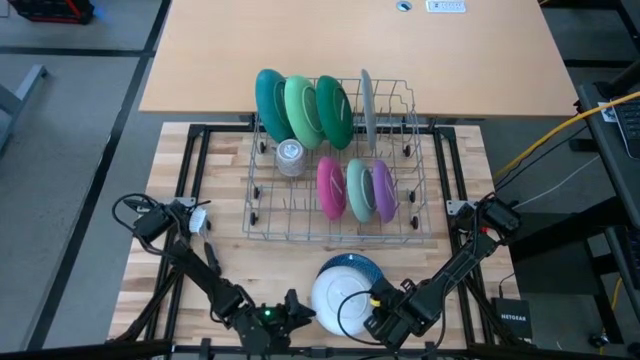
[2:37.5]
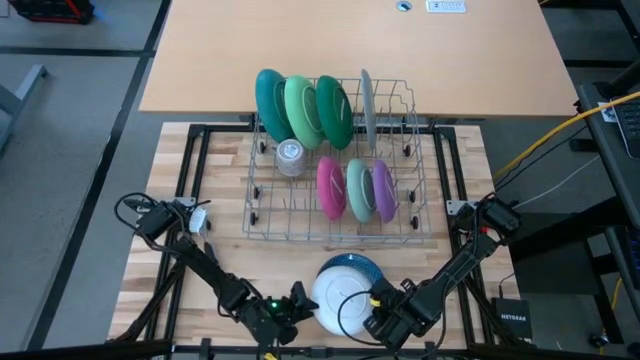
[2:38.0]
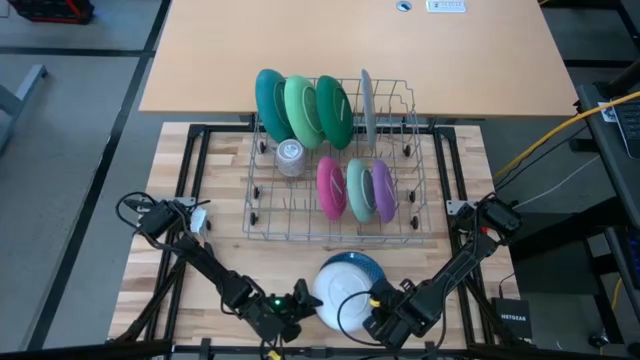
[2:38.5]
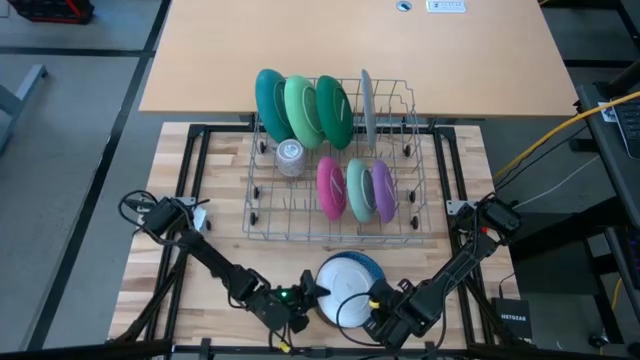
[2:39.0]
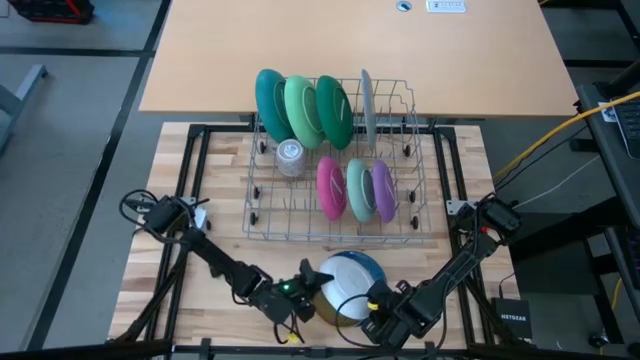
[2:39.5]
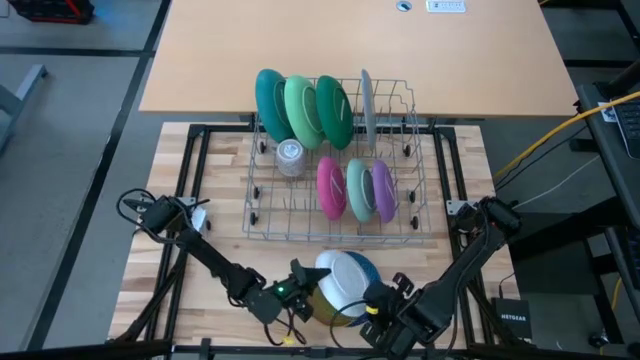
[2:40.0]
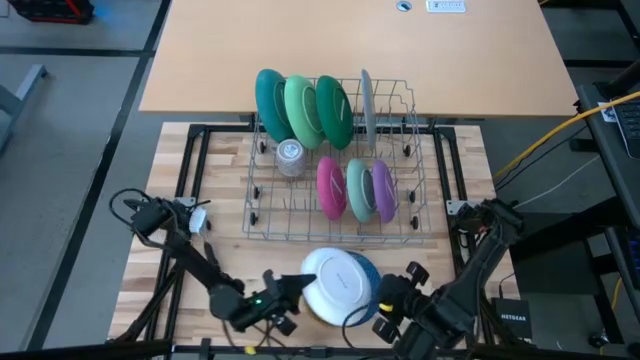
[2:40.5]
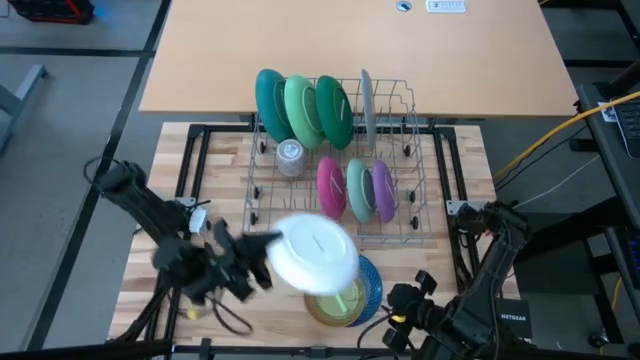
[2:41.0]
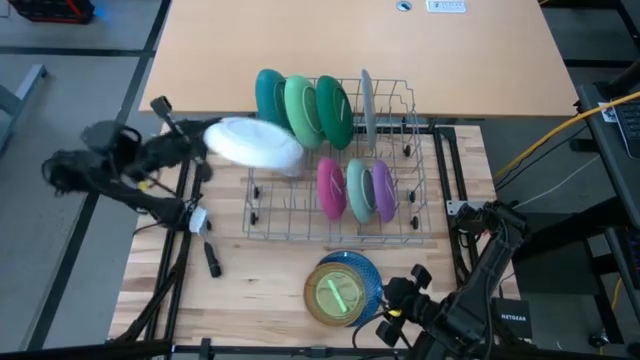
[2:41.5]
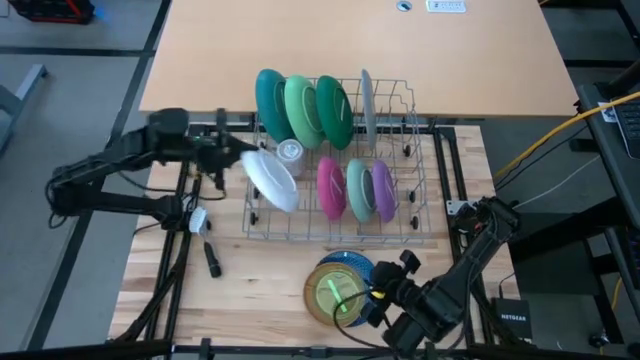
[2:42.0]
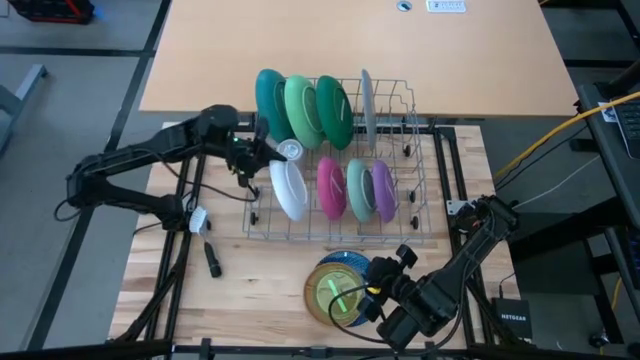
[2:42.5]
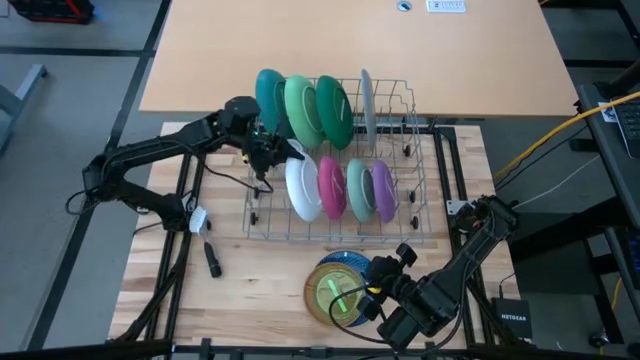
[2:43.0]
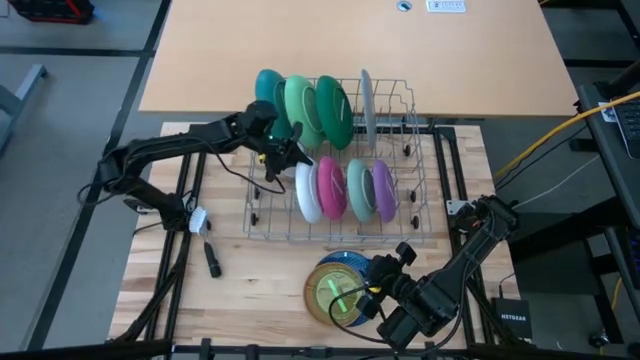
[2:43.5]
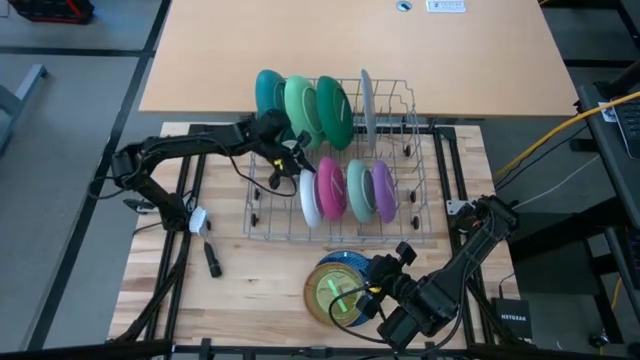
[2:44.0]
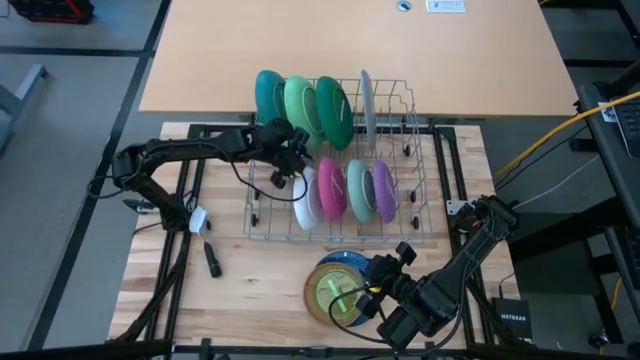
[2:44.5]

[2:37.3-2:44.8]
Task: Sort dishes
Put the white plate in the dish rack

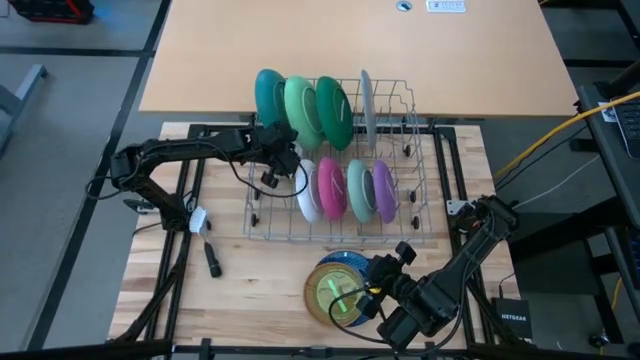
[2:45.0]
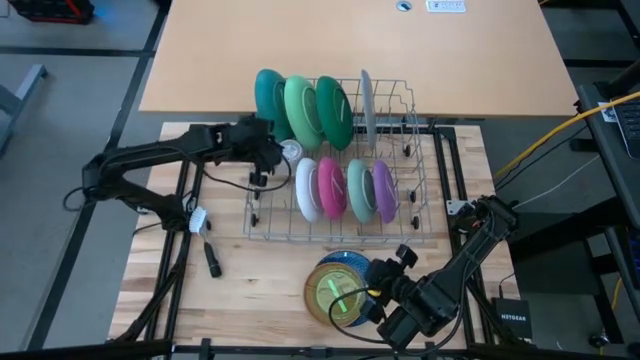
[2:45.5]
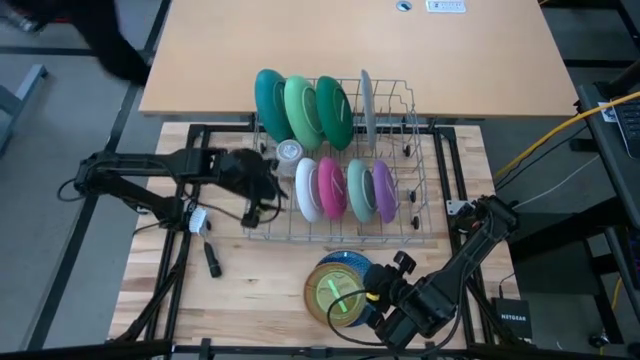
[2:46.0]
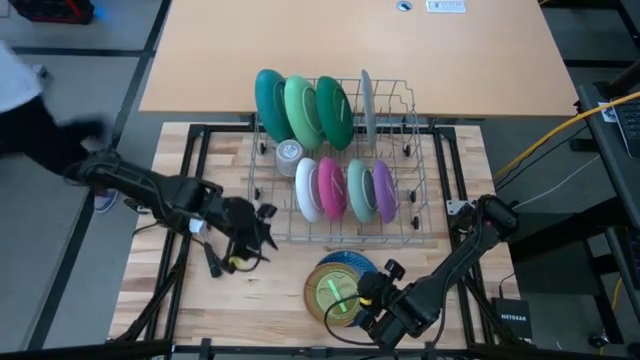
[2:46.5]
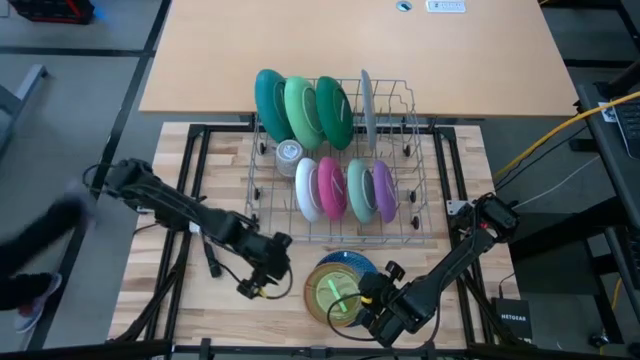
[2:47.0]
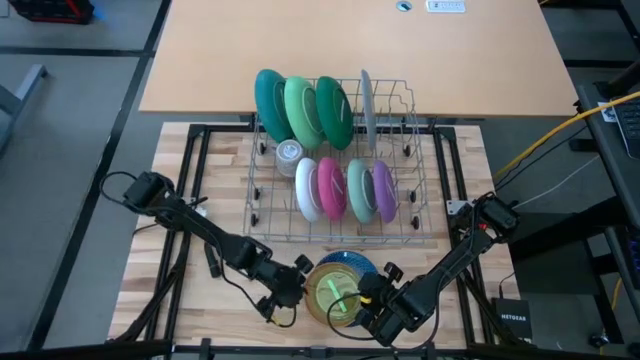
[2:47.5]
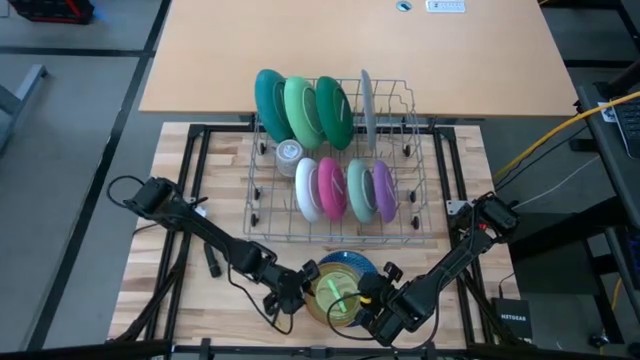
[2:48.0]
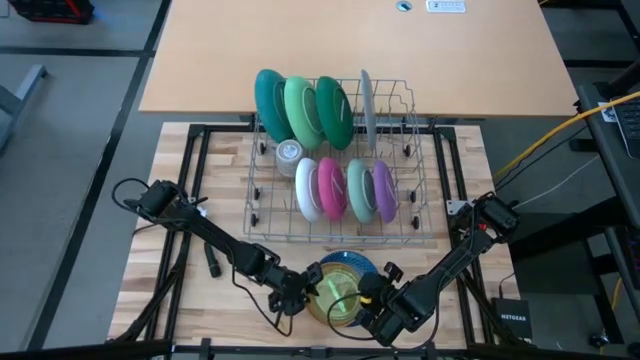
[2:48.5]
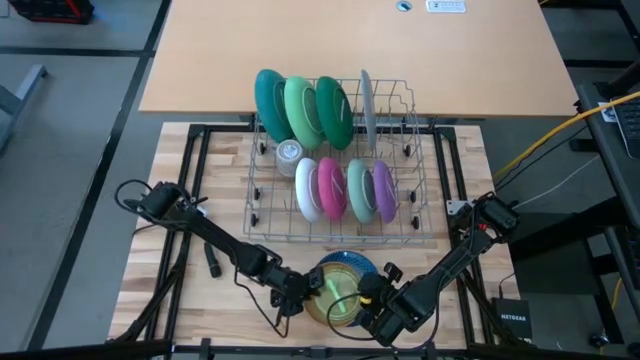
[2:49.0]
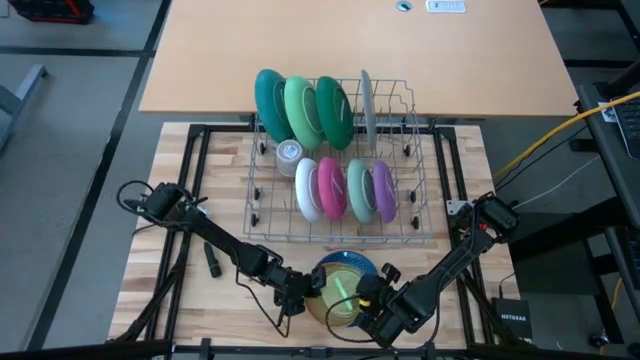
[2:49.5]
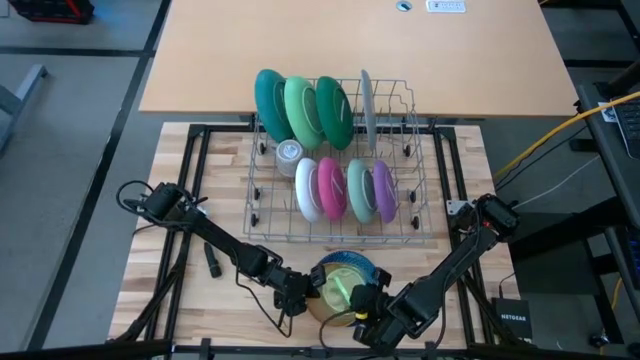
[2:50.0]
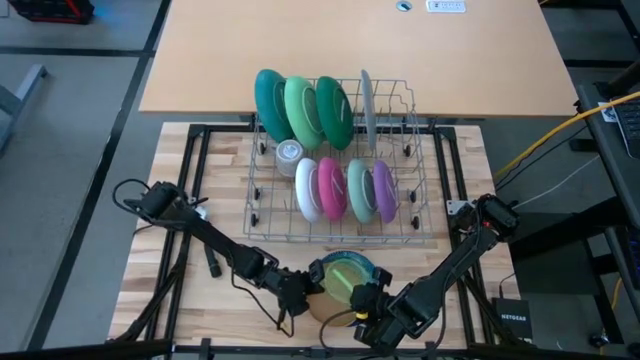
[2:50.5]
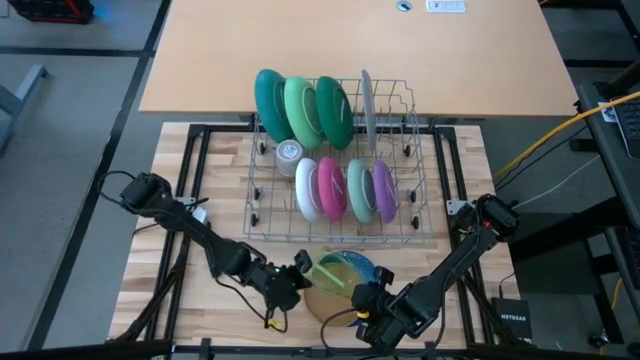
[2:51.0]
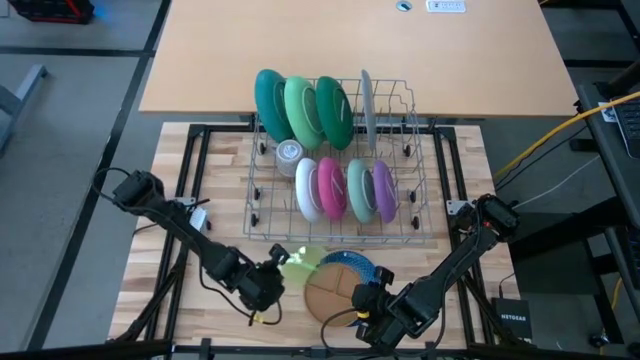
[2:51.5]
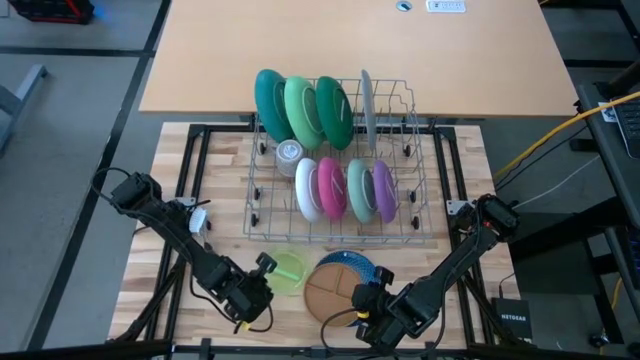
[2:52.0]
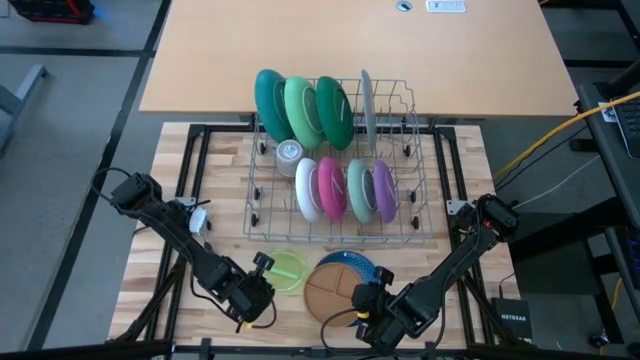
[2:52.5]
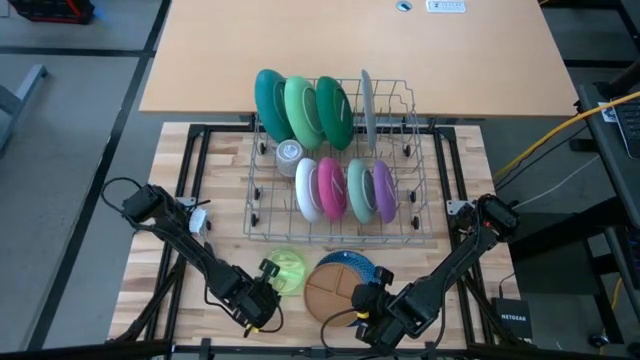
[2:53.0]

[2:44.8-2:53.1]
Move the transparent green plate from stacked plates to the bottom center

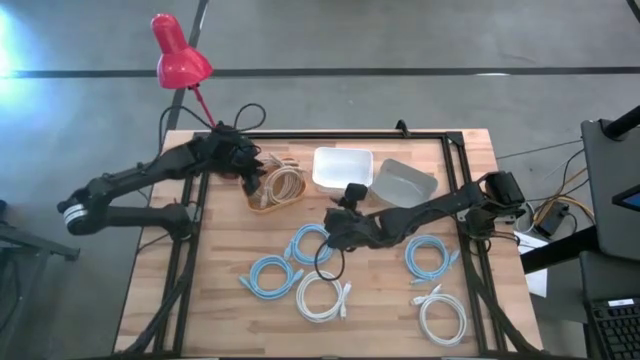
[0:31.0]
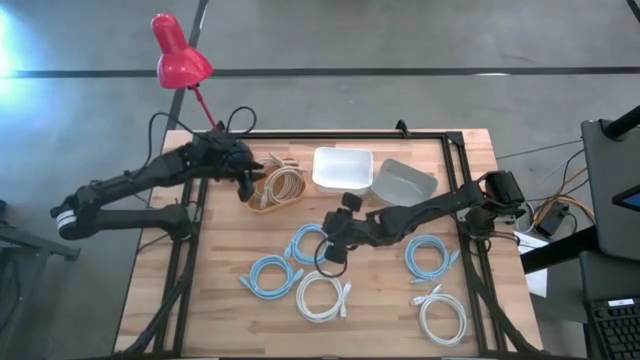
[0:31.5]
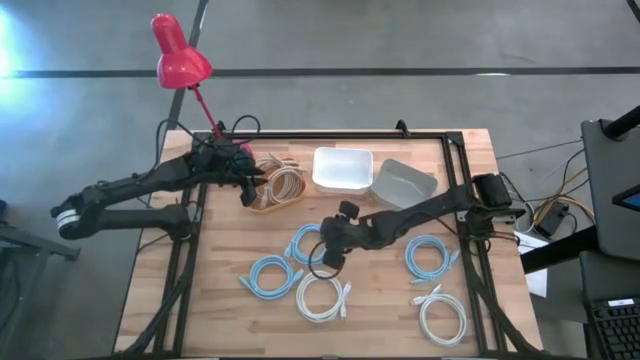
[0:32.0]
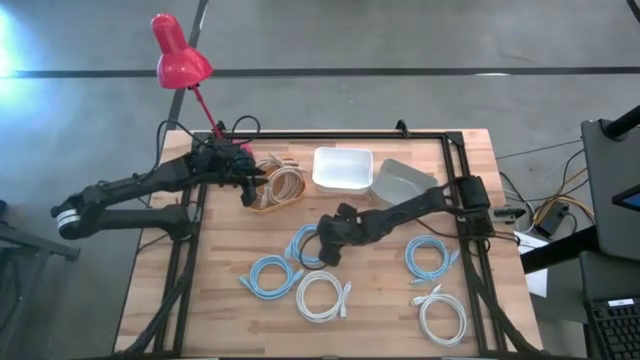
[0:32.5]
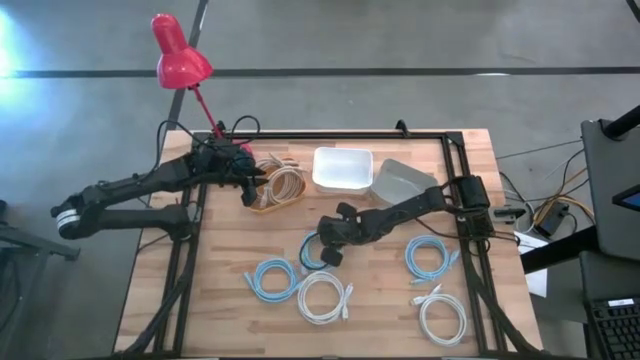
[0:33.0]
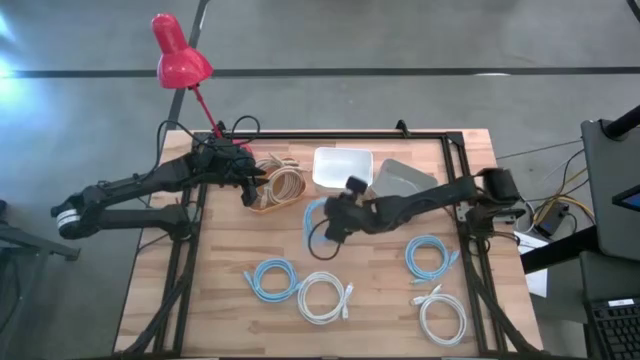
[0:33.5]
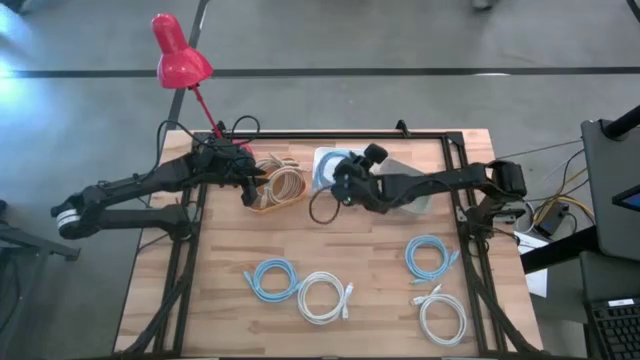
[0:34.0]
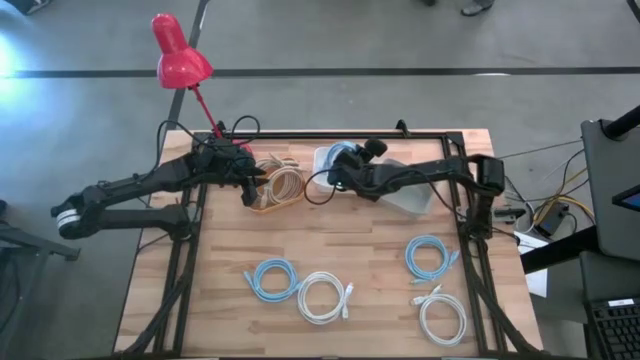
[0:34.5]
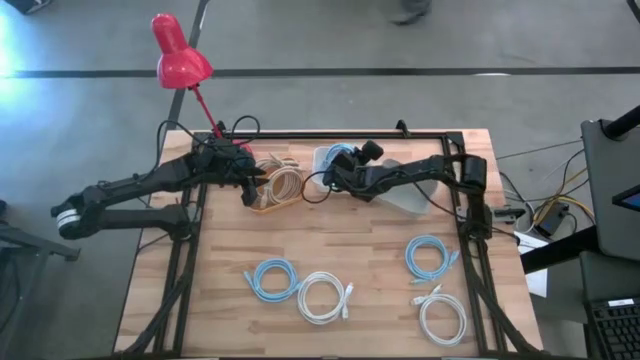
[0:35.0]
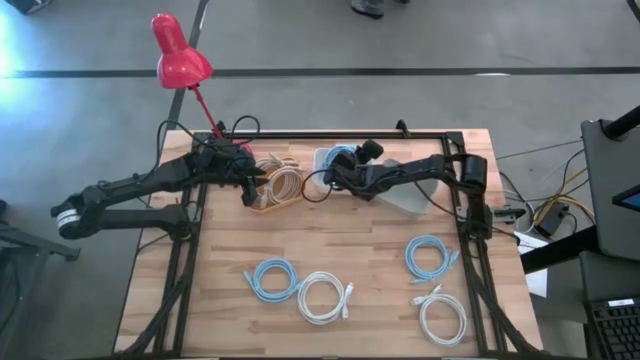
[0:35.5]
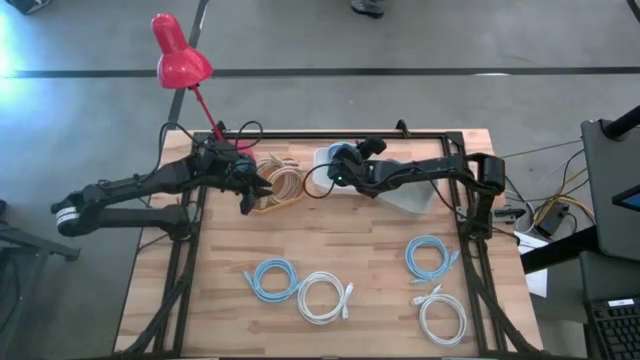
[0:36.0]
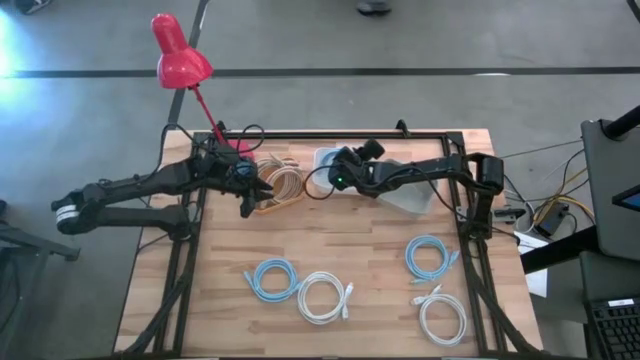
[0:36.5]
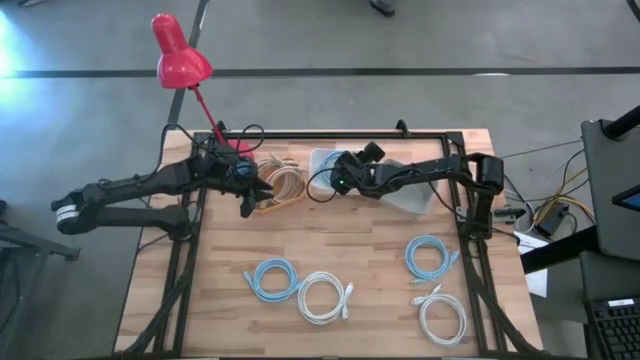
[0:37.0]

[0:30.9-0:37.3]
Task: Pick & Place USB Port
Put the top left blue usb cable into the white bin
